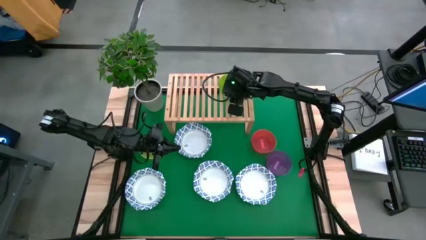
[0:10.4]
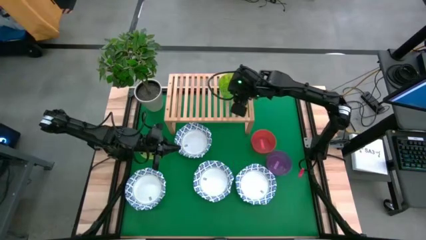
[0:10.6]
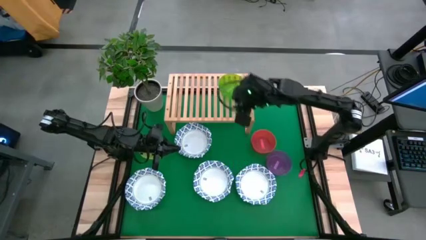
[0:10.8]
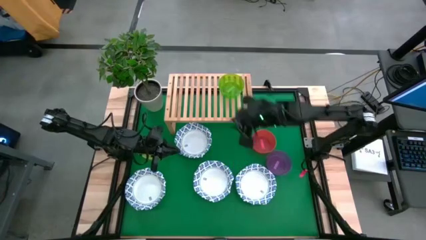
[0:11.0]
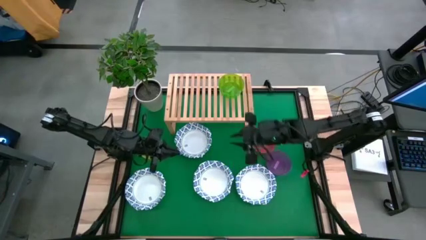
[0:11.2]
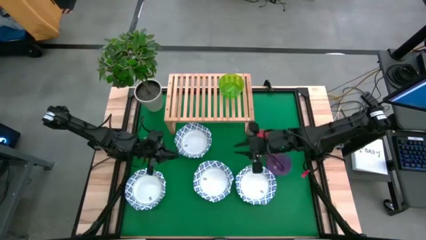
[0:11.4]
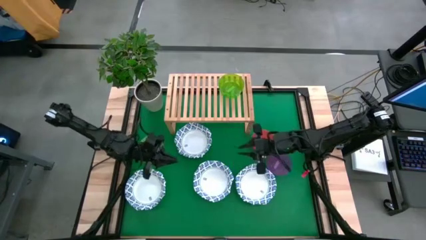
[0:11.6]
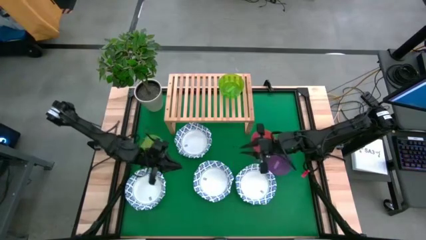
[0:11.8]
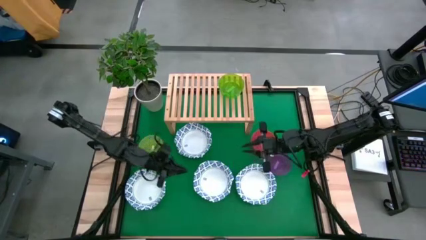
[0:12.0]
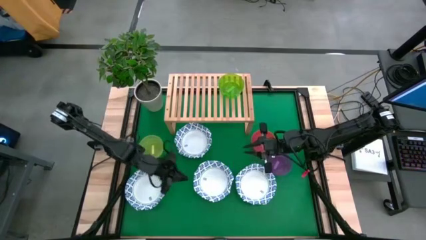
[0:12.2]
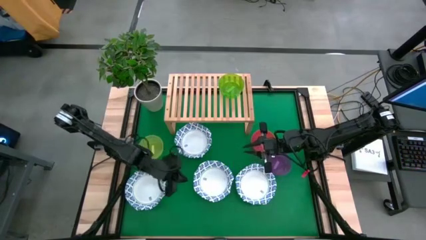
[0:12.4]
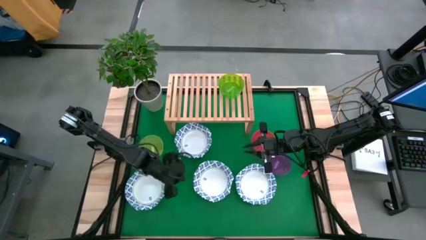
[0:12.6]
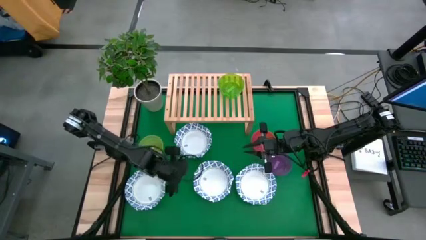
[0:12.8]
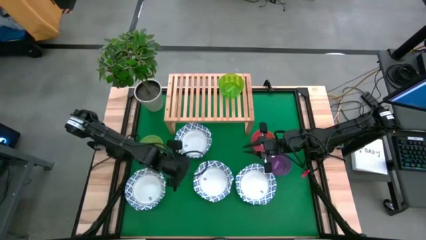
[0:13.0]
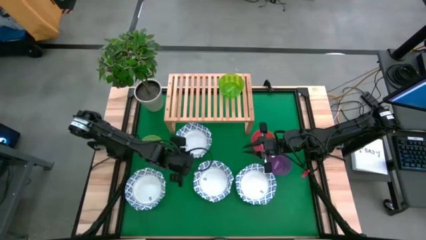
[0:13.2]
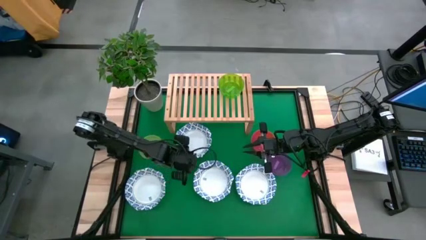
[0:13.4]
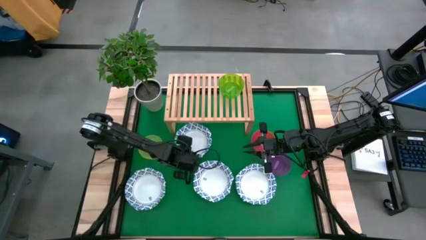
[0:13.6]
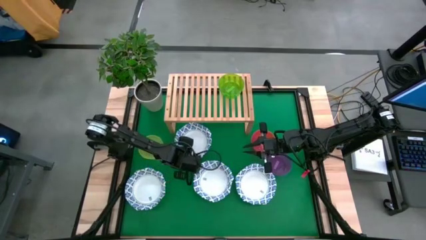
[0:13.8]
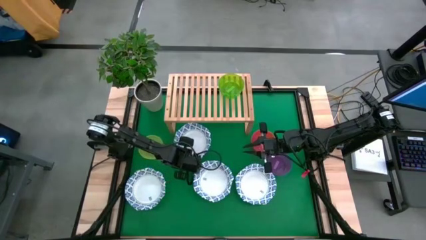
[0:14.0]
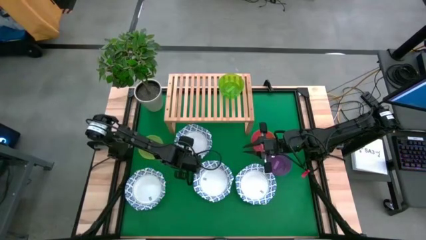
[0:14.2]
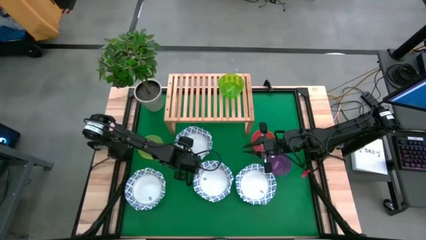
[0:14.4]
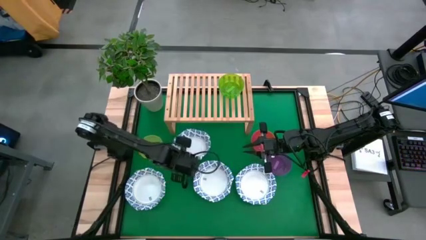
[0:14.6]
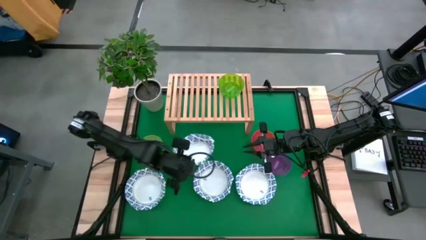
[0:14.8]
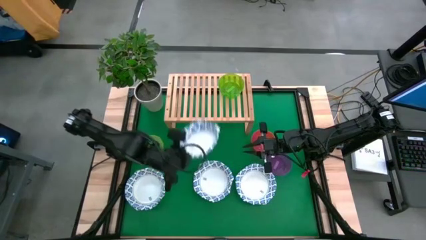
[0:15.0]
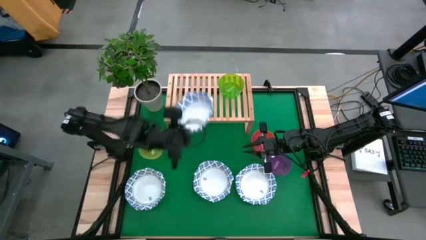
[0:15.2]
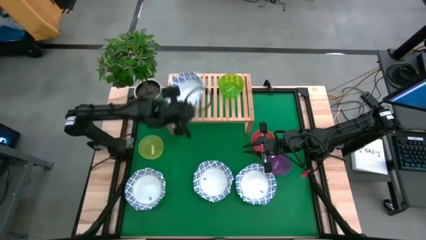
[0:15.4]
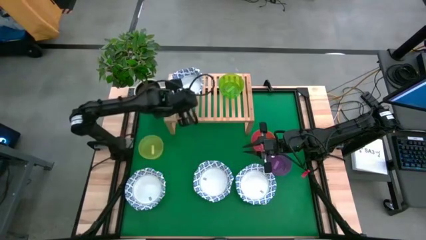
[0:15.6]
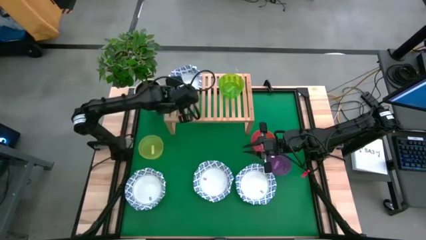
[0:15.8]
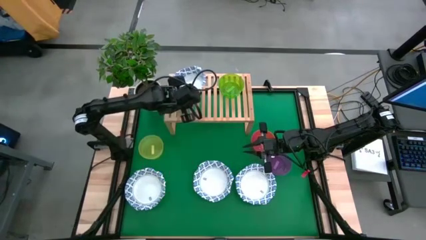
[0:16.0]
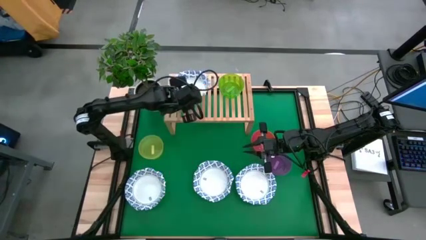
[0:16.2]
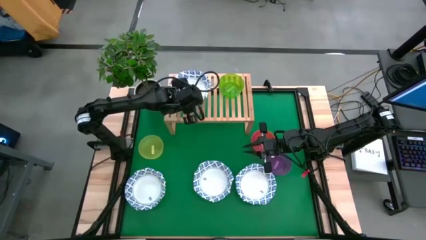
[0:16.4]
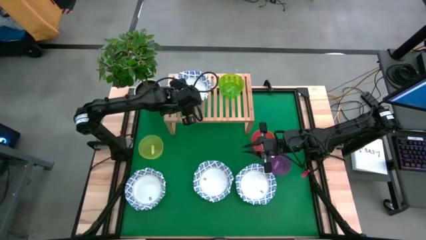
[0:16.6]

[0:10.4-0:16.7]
Task: Place and stack bowls onto a shelf
Put the white patterned bowl on the shelf

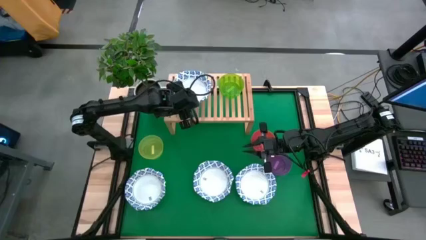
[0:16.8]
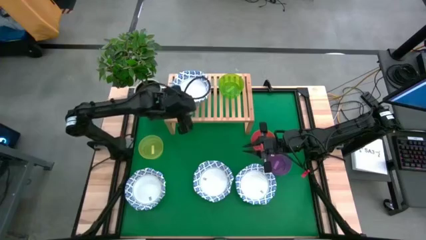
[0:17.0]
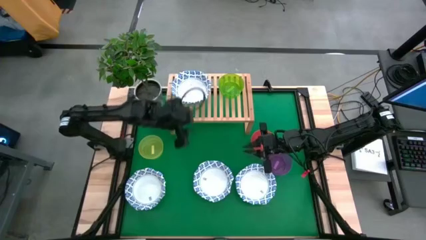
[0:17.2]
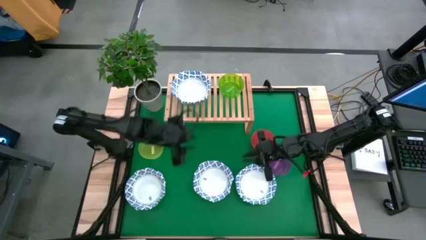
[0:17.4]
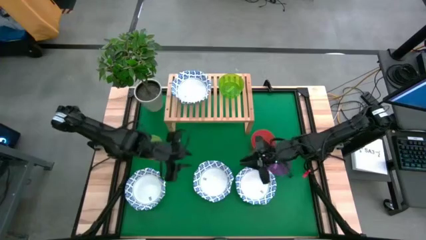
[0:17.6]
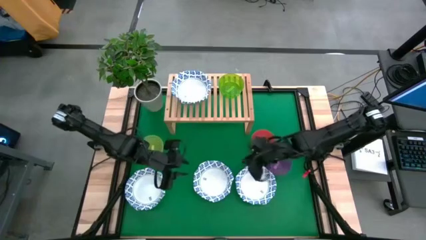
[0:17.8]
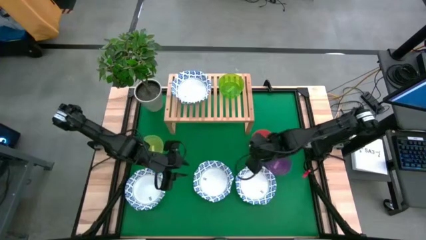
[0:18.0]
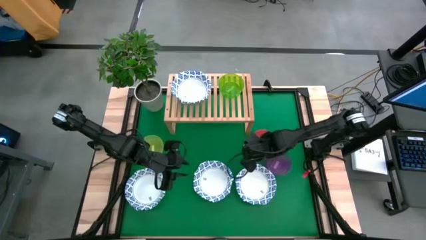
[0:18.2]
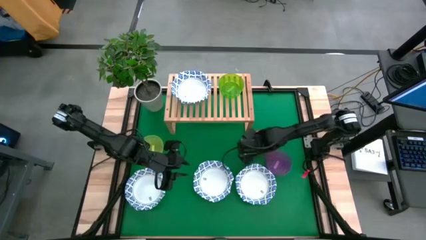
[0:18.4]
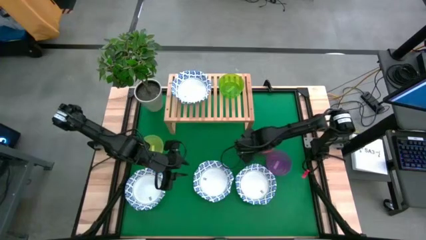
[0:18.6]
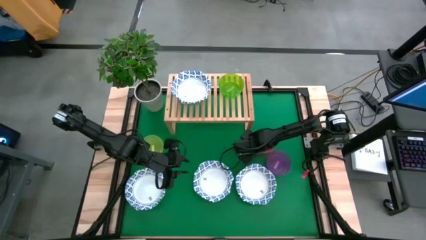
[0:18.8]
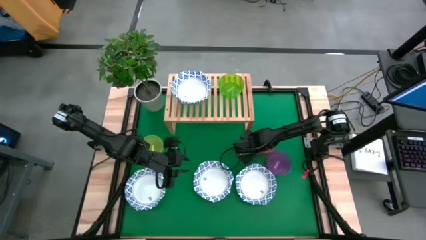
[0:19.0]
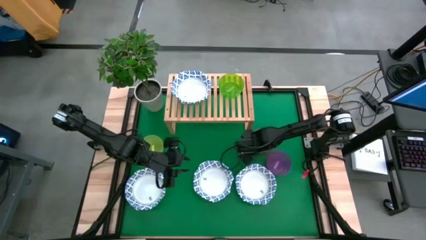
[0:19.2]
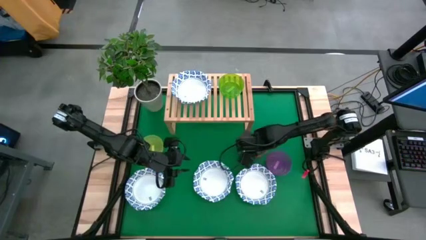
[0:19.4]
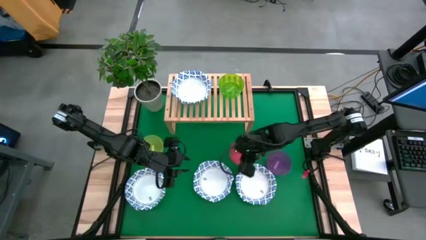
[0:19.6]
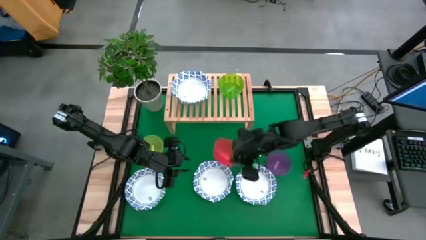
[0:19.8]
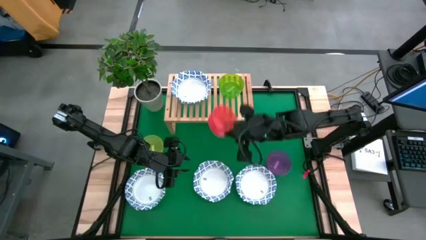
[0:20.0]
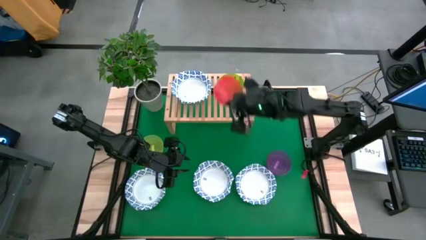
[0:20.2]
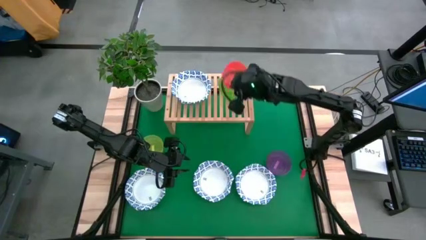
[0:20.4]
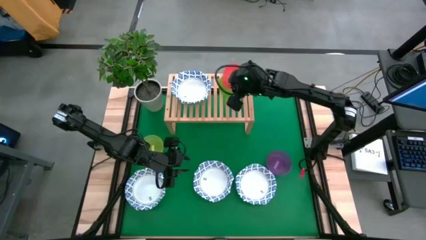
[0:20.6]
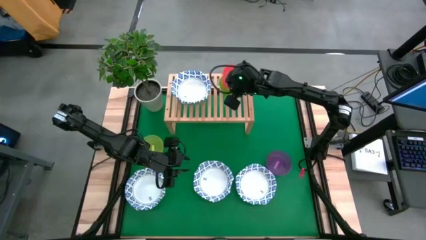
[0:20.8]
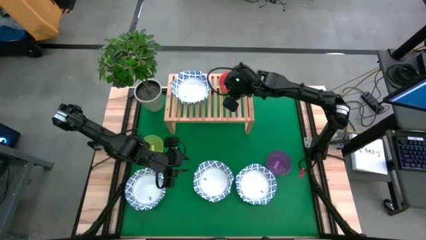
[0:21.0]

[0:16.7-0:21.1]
Stack the orange bowl on top of the green bowl on the shelf

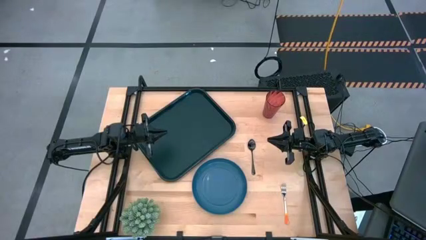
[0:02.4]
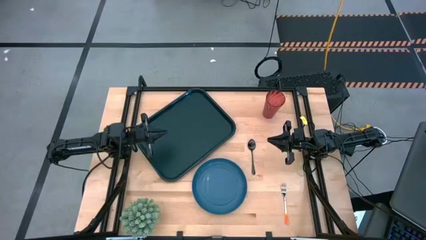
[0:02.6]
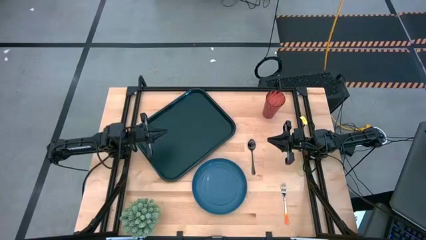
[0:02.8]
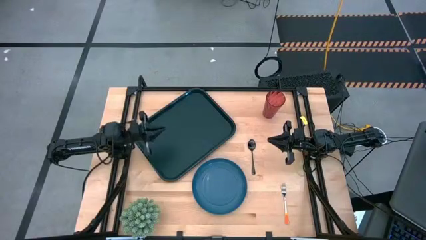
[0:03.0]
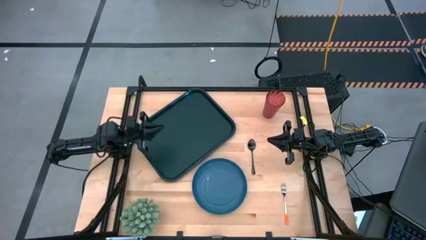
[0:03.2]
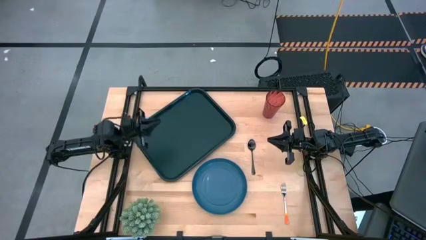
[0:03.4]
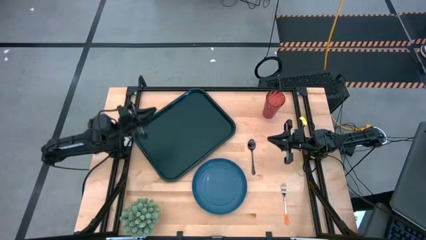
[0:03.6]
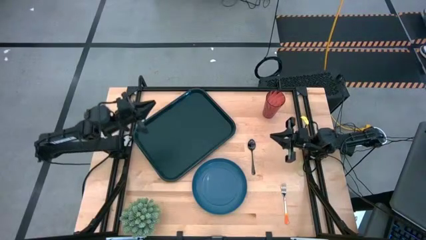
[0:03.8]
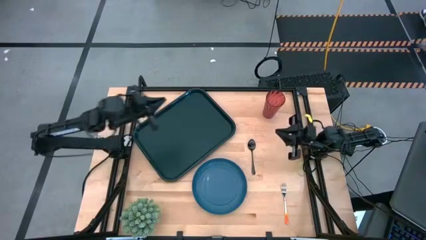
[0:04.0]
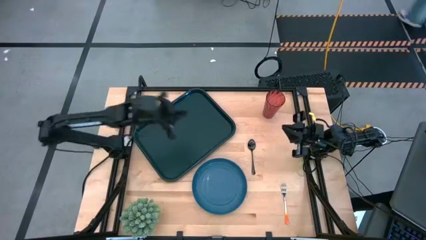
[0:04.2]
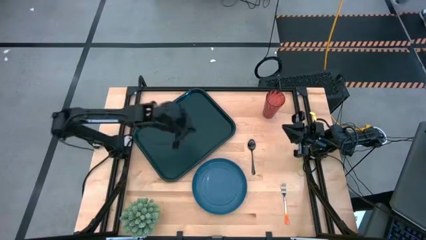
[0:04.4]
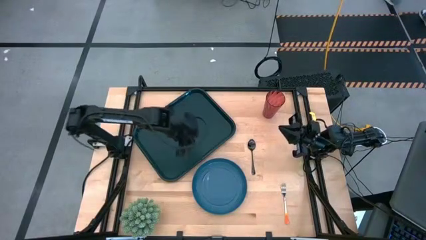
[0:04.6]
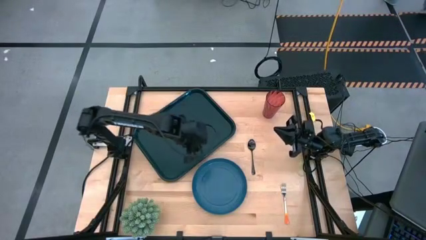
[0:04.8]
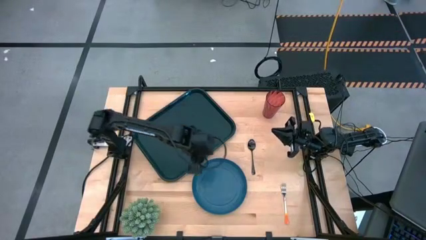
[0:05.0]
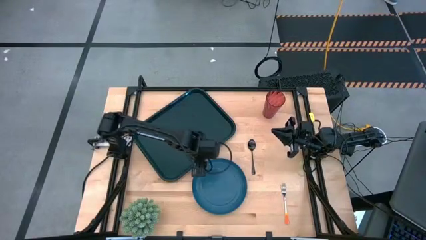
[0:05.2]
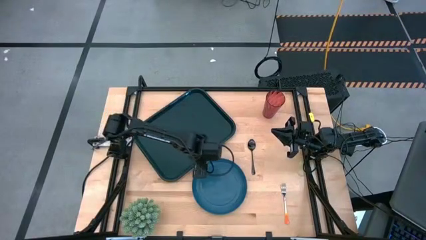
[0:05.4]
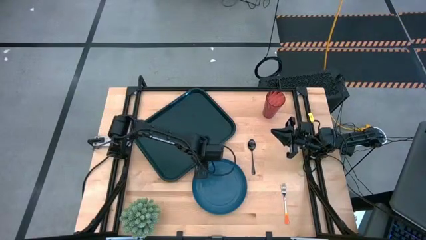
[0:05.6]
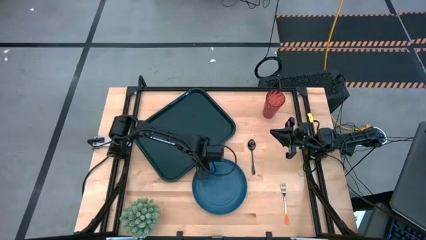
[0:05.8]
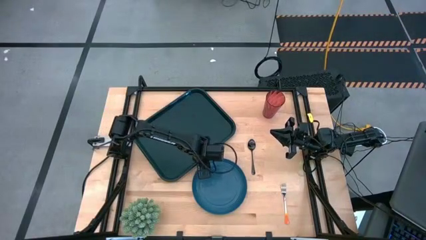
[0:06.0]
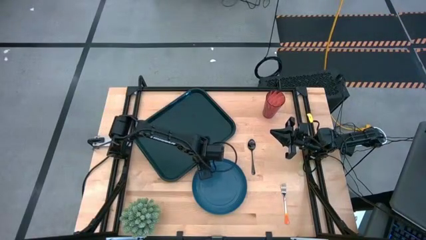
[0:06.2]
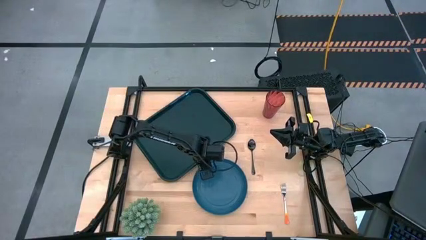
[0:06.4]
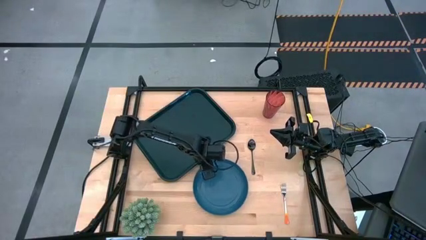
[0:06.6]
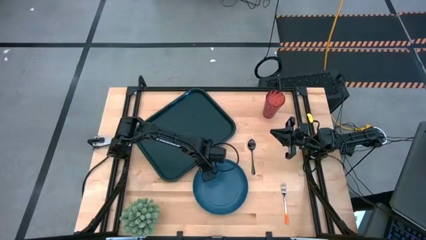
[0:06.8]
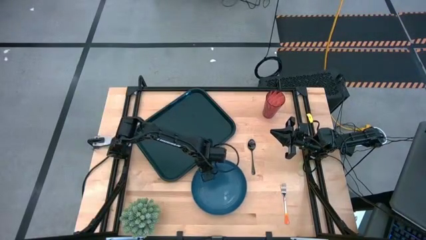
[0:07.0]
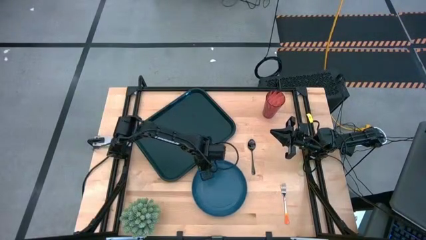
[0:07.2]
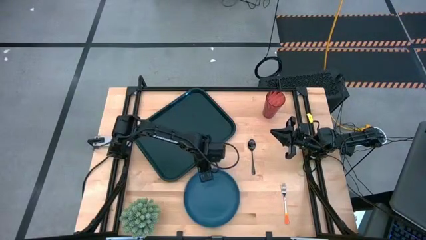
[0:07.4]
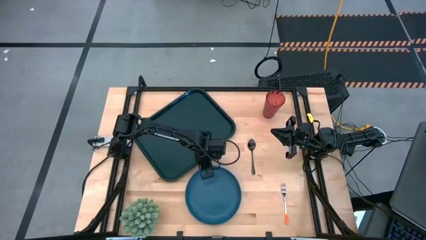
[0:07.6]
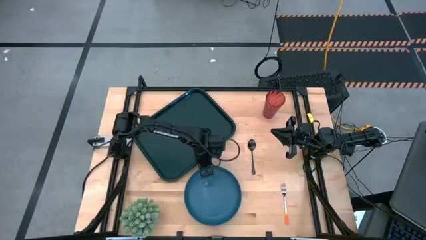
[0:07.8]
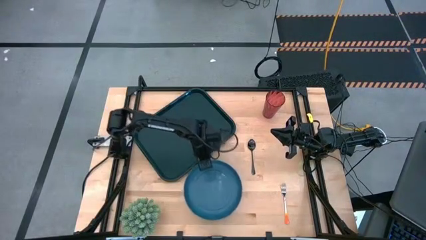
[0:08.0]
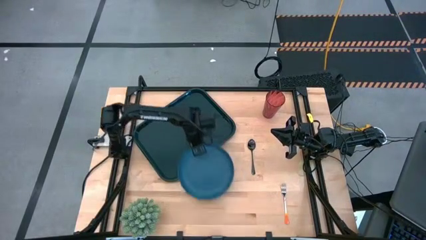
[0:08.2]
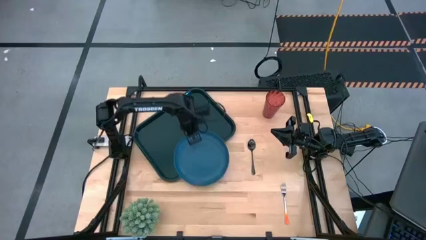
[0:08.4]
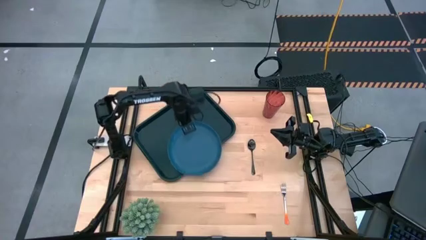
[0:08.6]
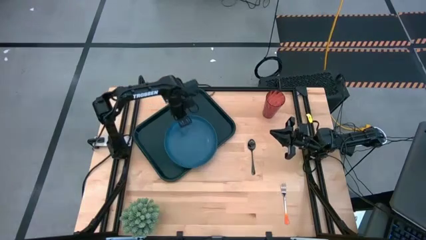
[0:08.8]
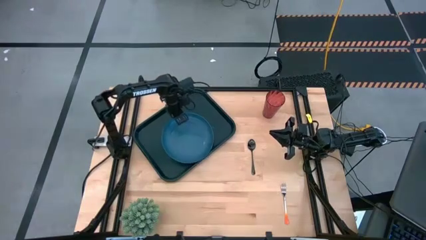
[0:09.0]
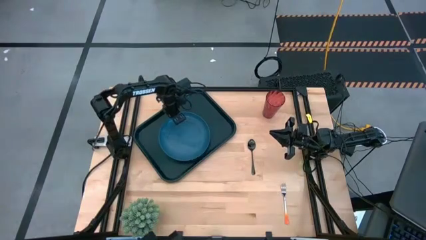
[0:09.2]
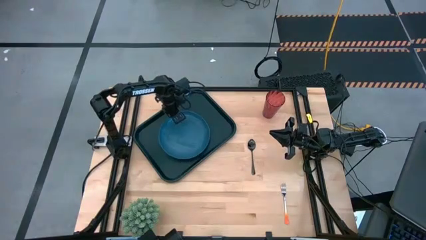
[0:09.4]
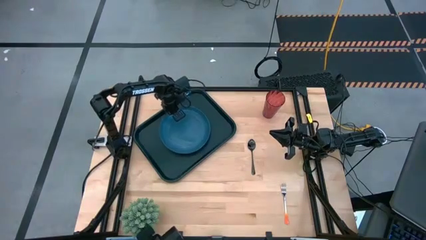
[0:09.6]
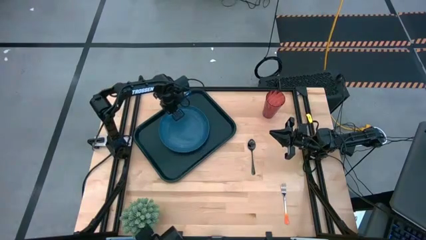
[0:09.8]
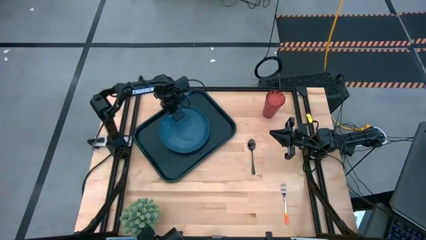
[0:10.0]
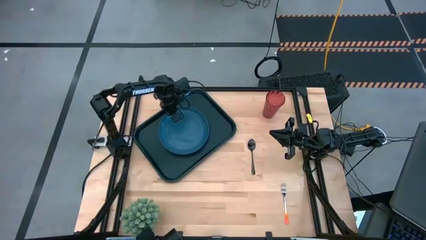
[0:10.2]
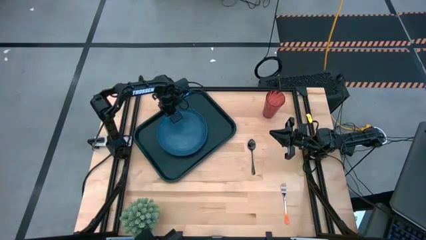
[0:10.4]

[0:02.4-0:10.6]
Task: Pick and place plate/cup/fork/spoon on tray
Put the plate on the black tray
